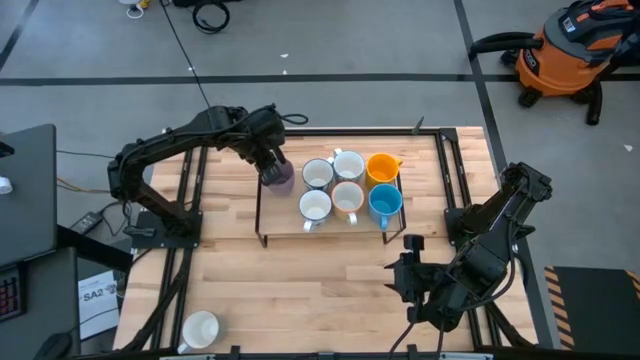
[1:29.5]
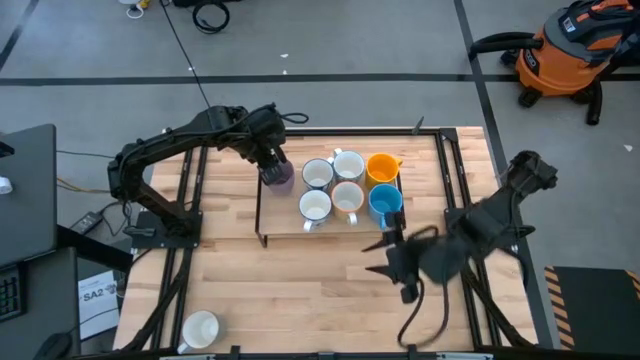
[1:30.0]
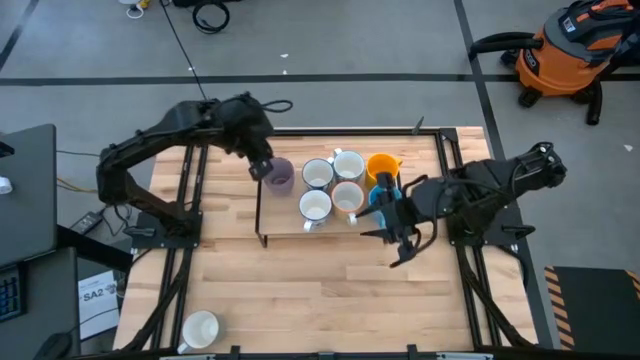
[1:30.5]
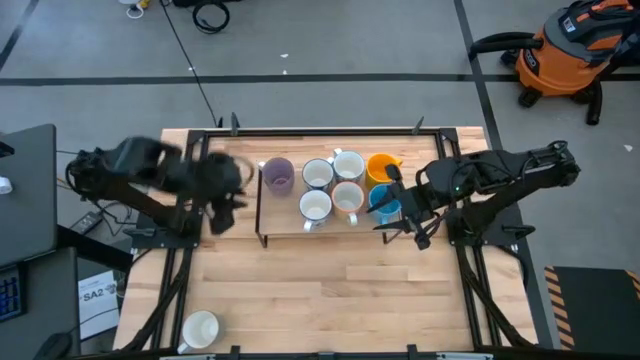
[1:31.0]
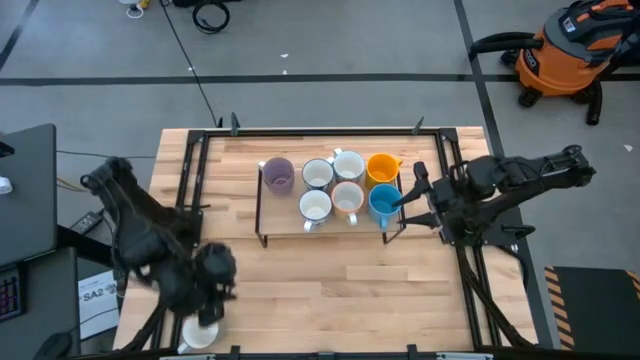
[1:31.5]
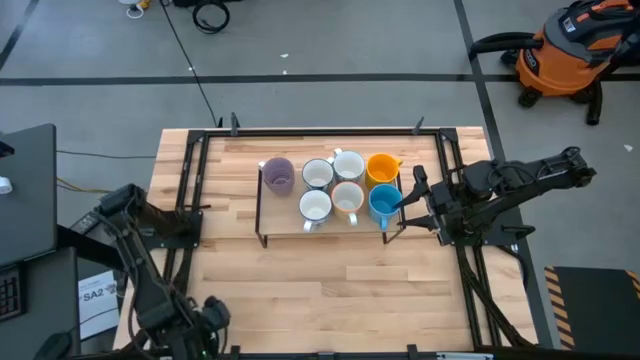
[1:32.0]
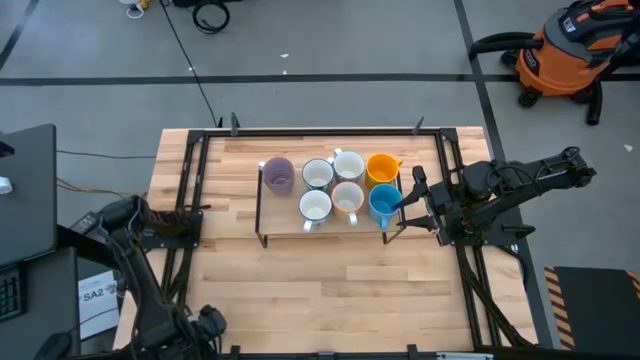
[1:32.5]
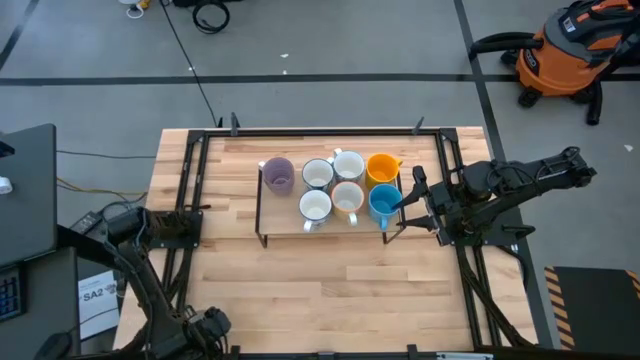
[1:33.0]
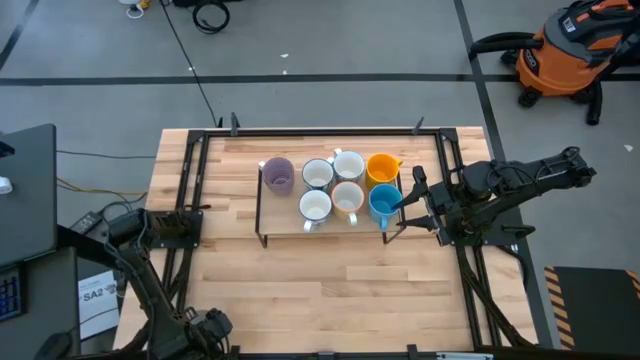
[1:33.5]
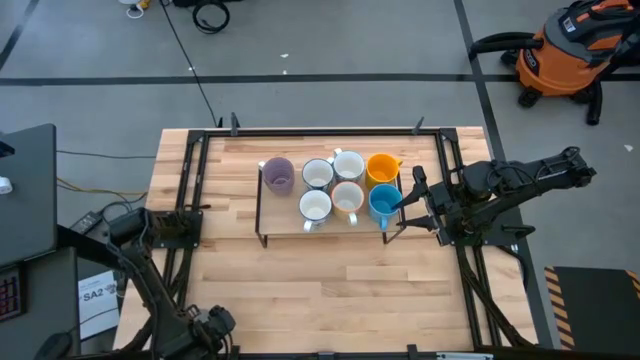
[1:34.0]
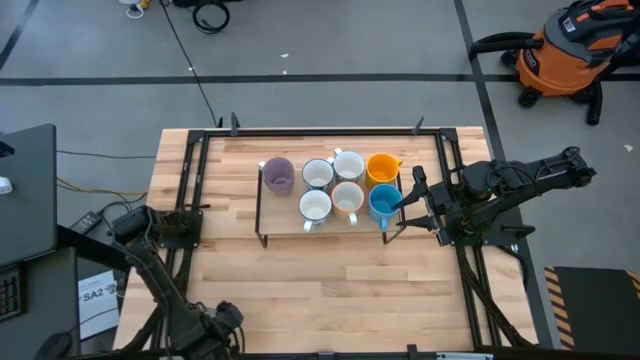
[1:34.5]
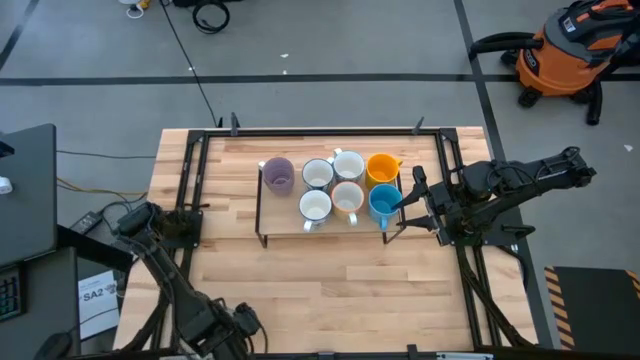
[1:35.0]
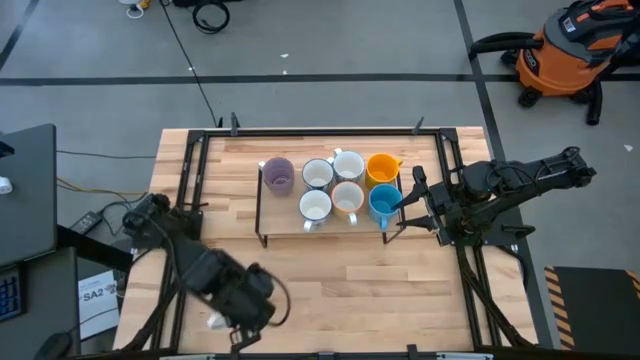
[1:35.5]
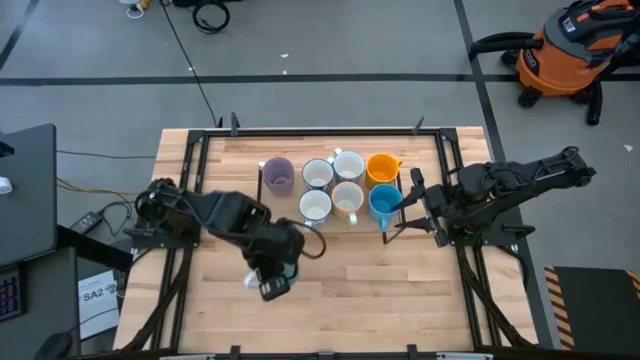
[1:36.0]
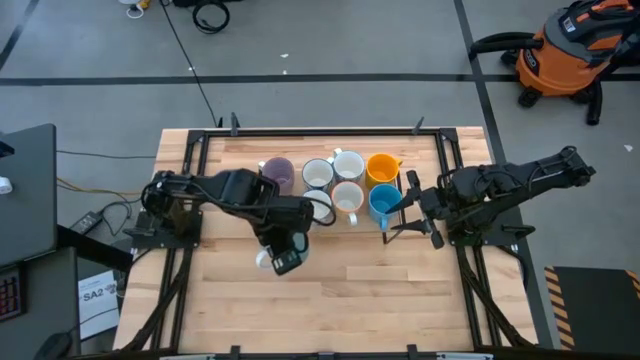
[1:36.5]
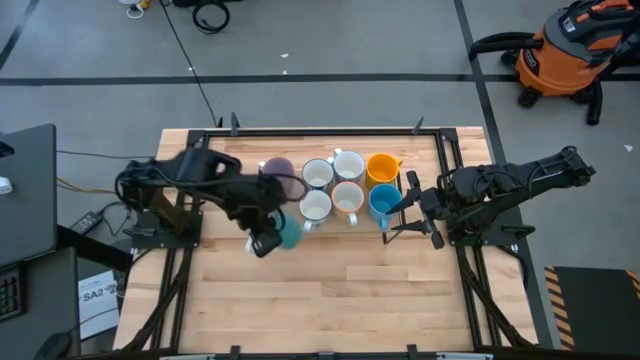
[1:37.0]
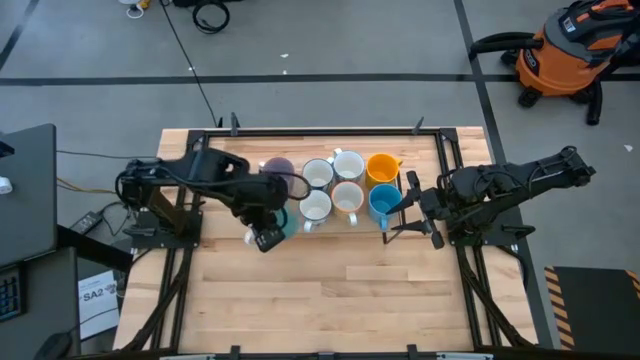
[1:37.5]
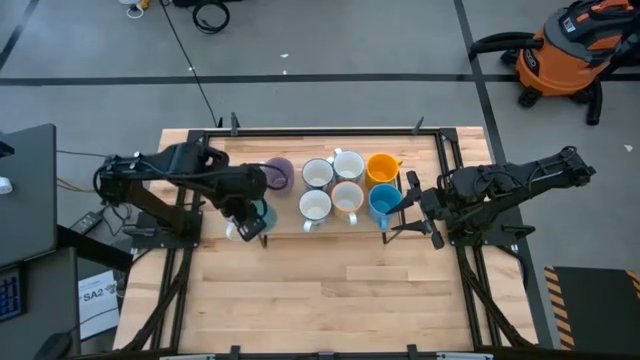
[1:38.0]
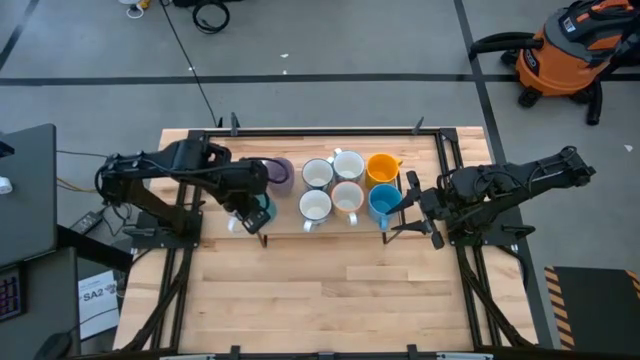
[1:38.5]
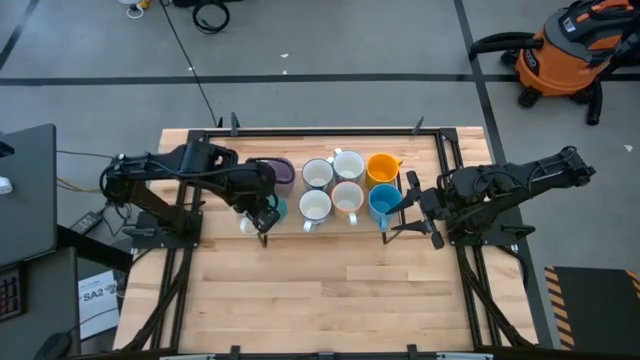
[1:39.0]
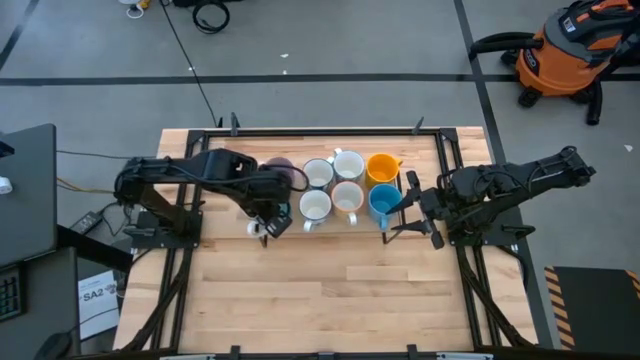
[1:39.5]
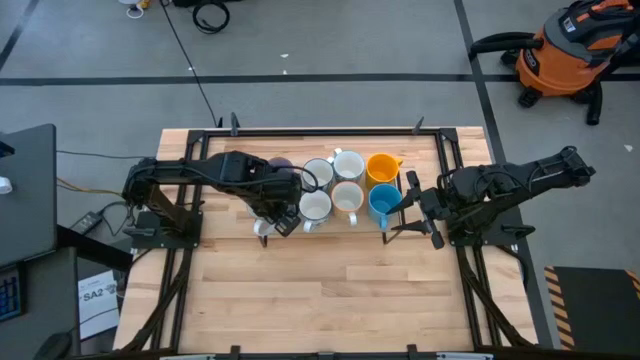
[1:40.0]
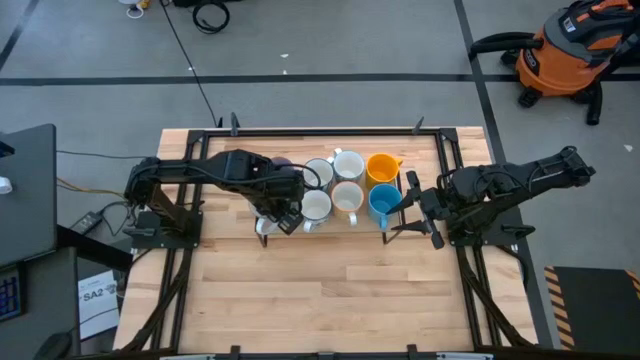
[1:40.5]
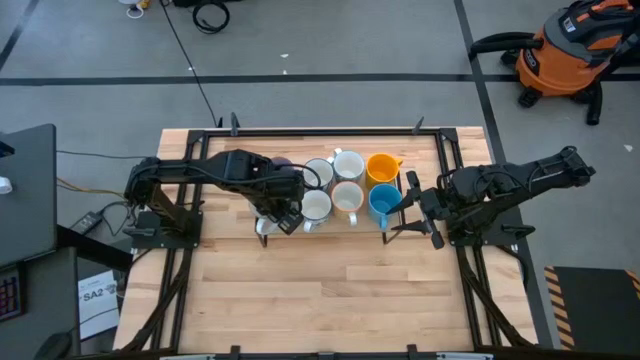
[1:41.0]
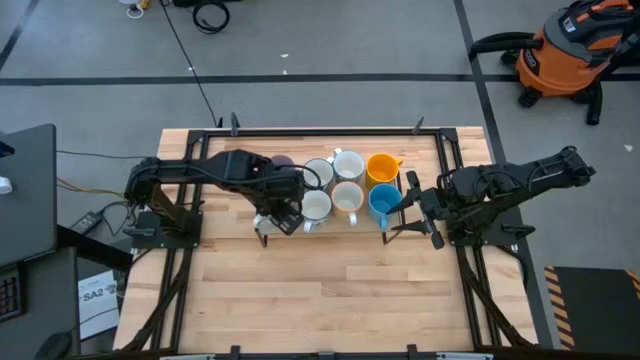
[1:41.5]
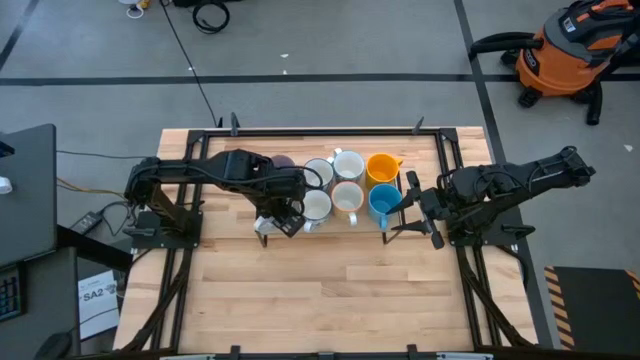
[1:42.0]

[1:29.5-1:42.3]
Task: Place coffee mugs
Put the green mug on the shelf

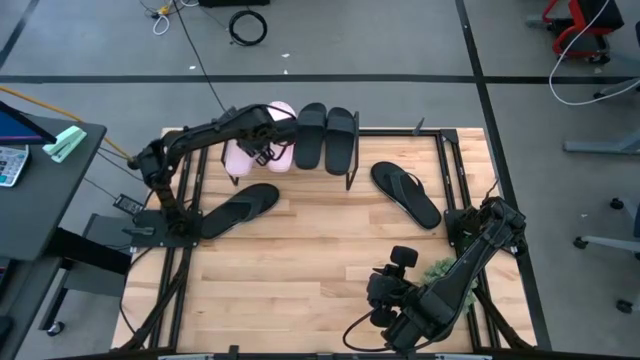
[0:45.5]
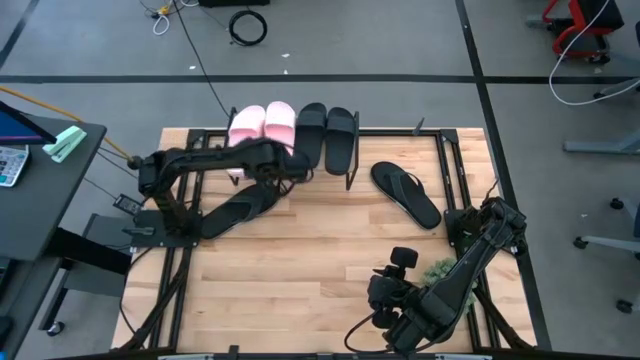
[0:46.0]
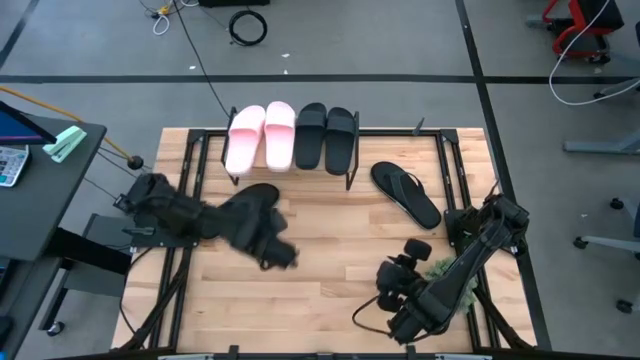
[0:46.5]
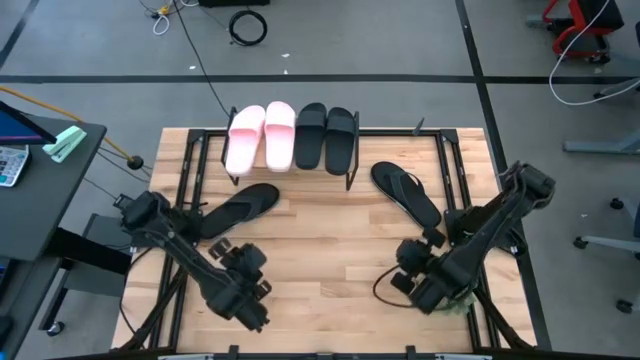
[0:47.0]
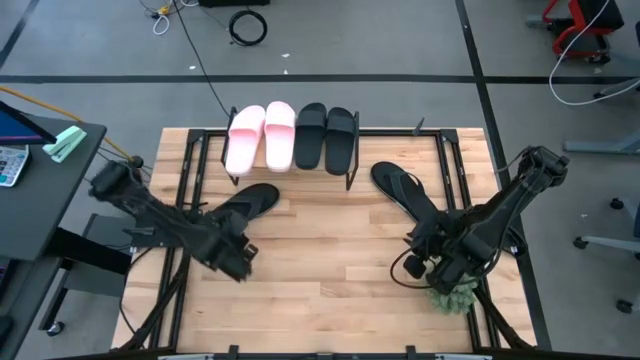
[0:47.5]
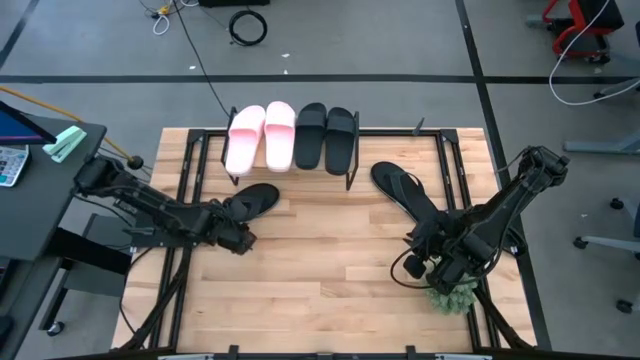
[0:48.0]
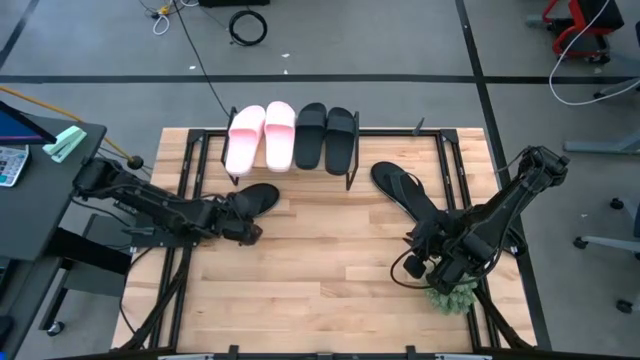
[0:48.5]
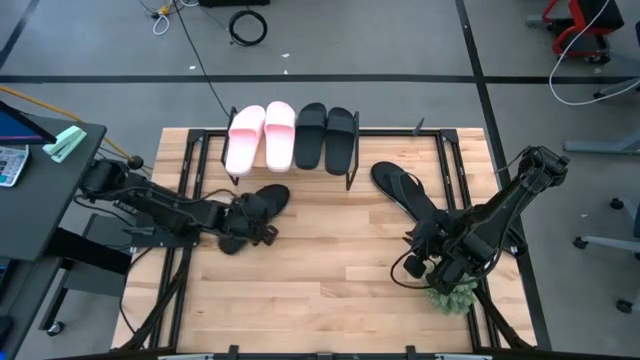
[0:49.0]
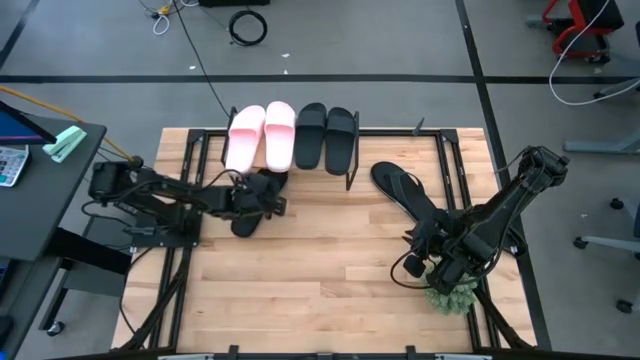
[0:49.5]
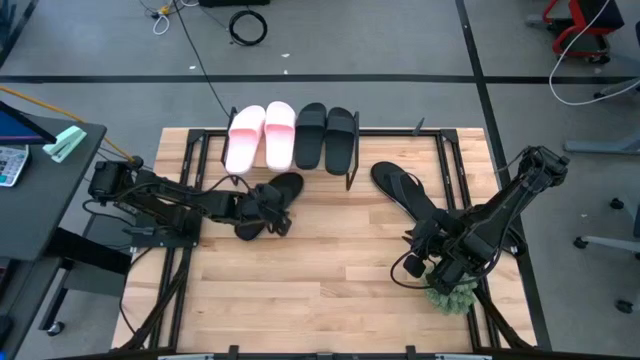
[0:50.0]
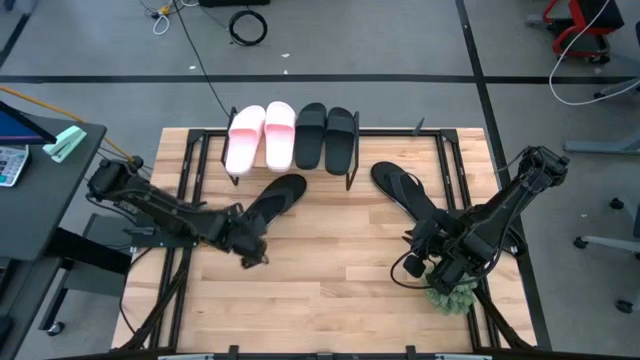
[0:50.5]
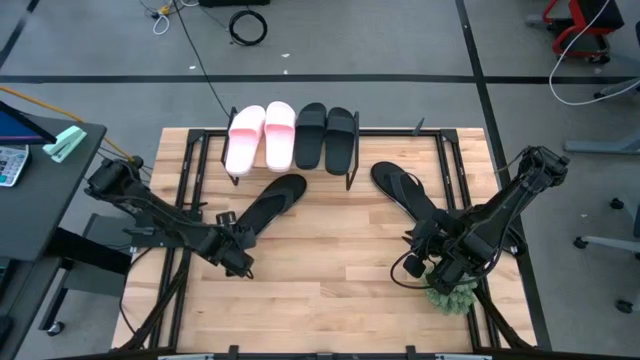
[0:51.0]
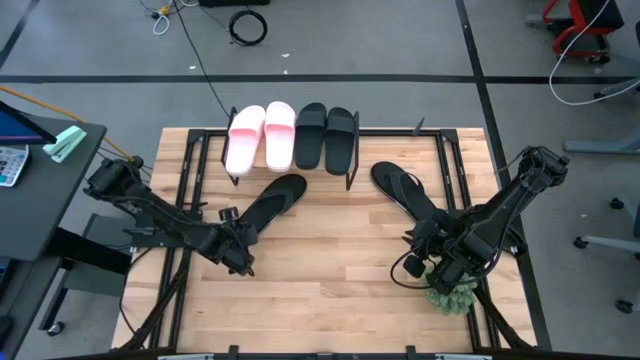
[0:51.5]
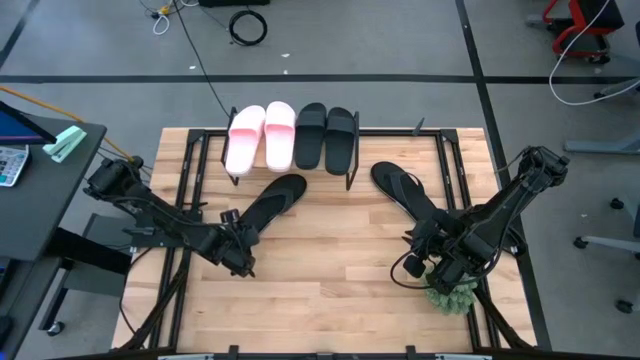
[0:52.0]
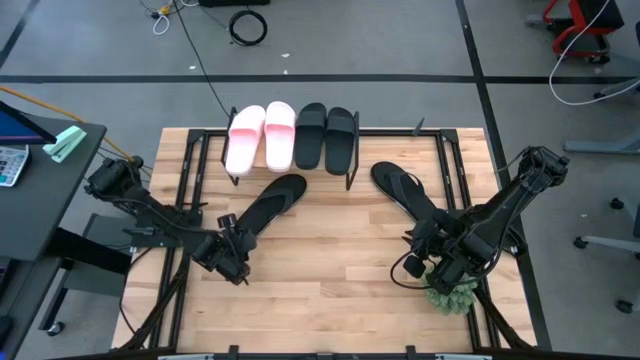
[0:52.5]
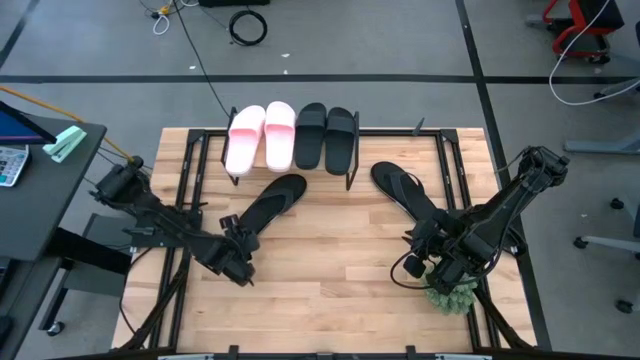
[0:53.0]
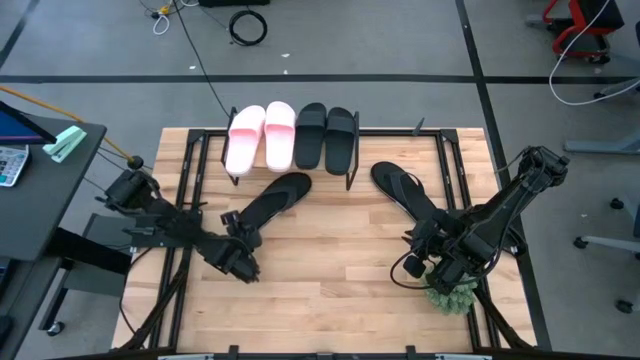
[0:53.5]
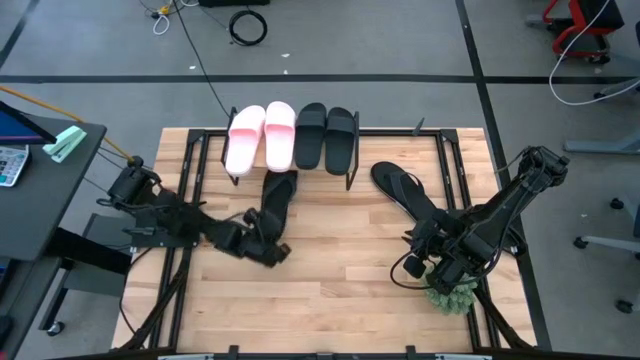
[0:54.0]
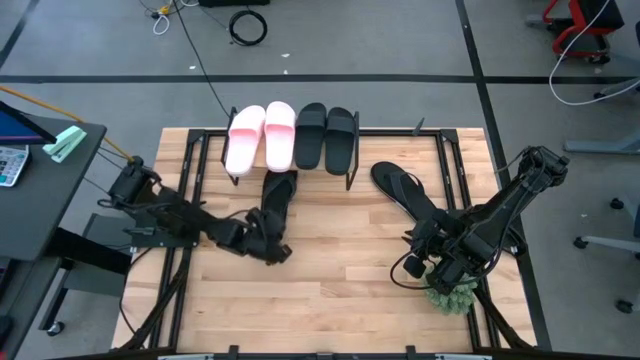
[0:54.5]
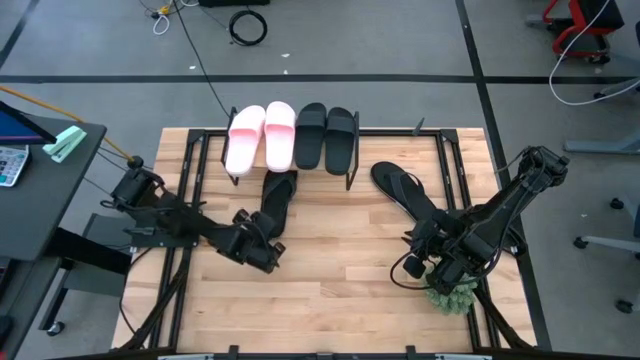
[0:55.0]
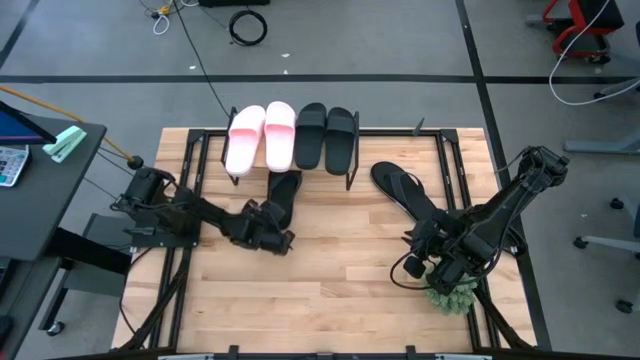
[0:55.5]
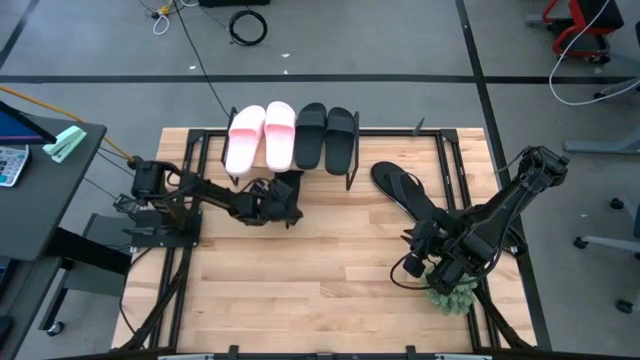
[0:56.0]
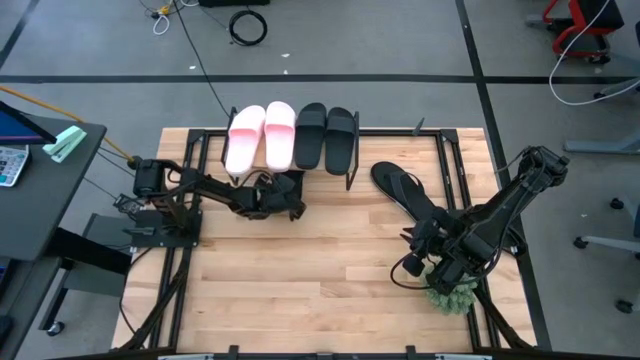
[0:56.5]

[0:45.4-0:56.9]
Task: Pick and place slides into the shelf
Put the black slipper under the shelf
